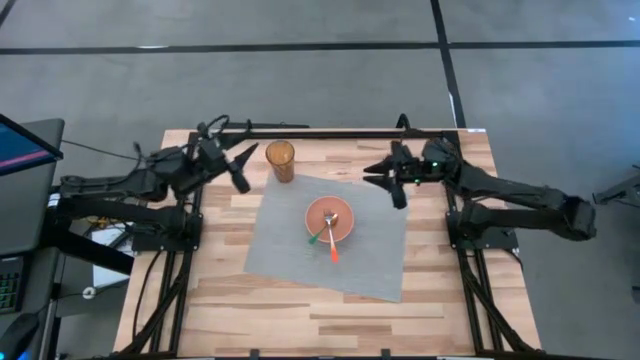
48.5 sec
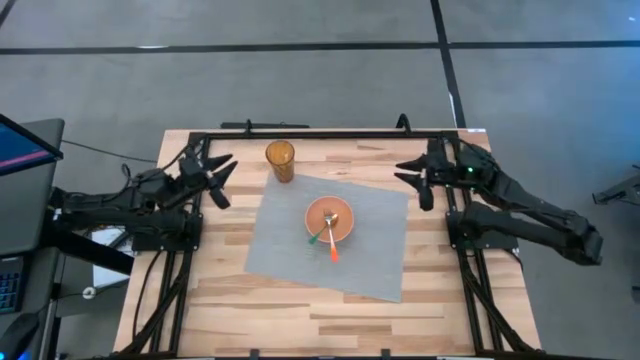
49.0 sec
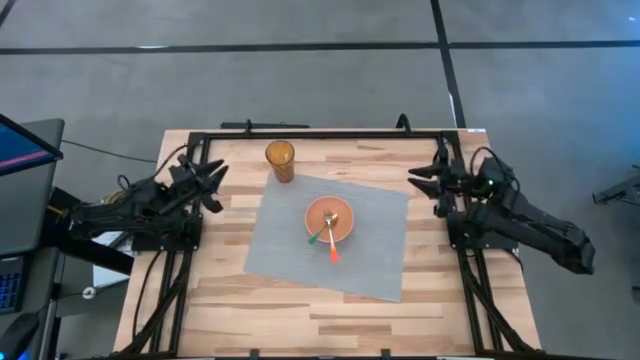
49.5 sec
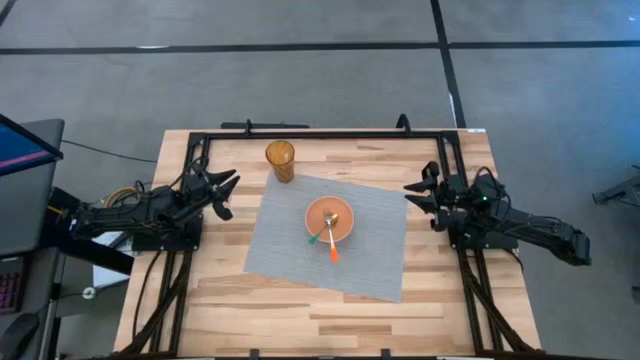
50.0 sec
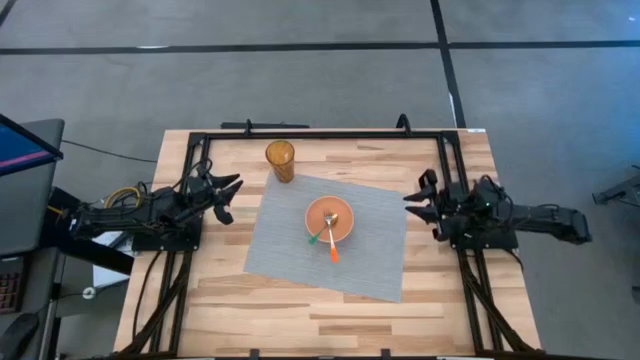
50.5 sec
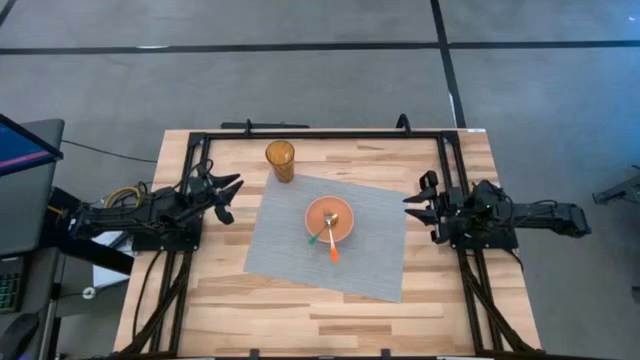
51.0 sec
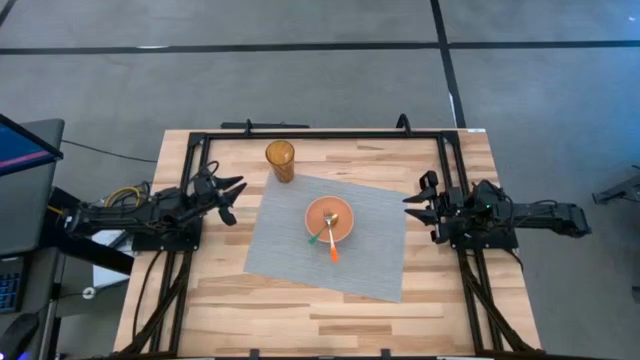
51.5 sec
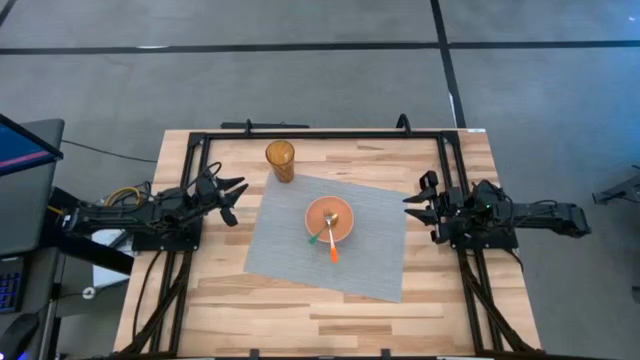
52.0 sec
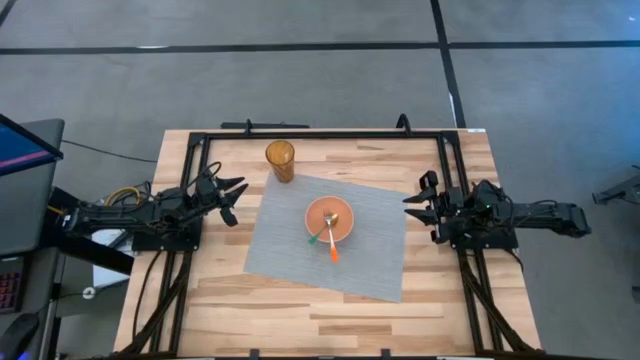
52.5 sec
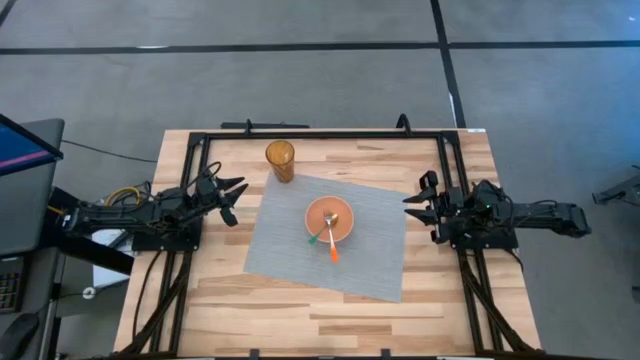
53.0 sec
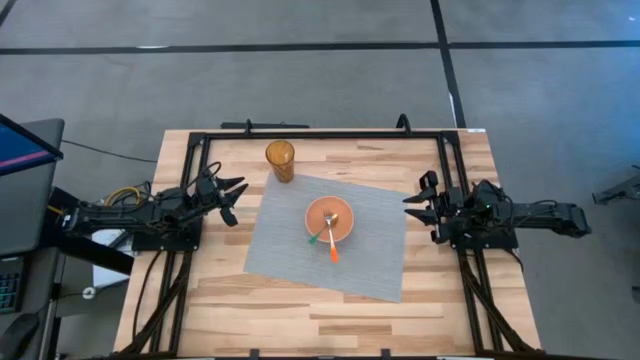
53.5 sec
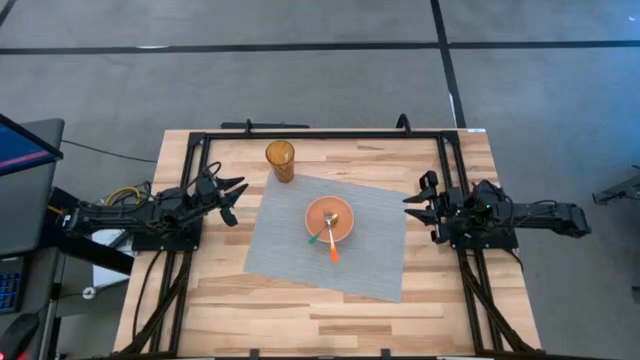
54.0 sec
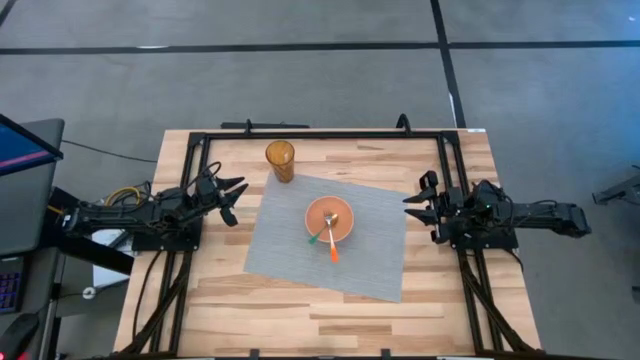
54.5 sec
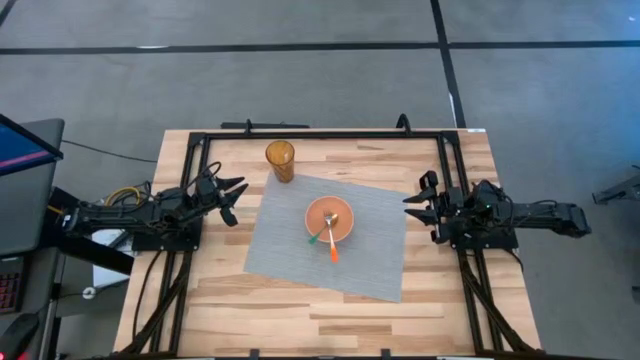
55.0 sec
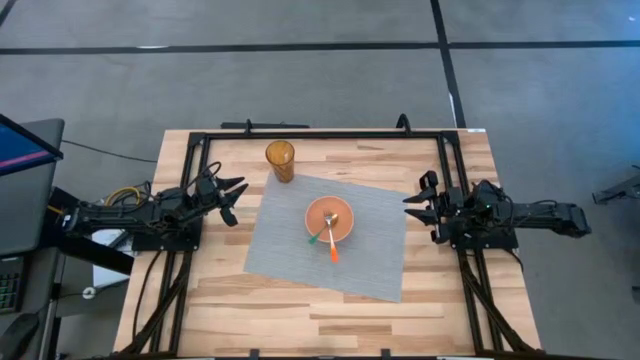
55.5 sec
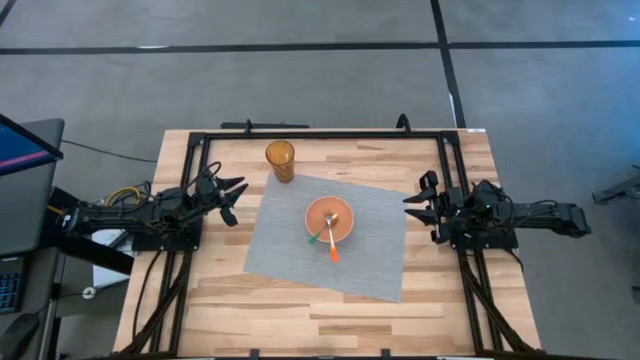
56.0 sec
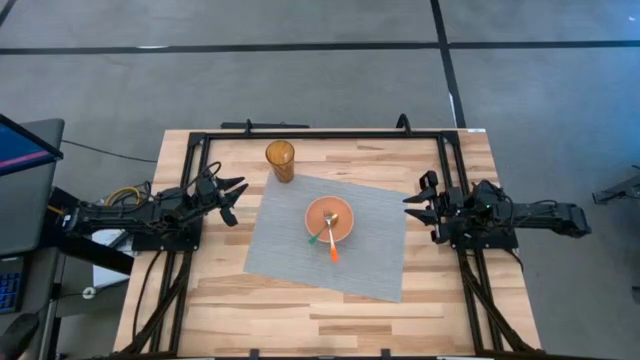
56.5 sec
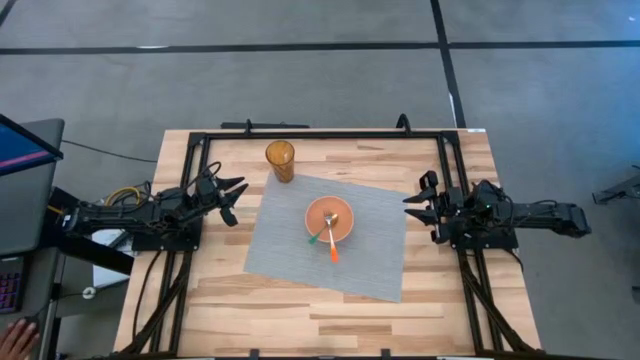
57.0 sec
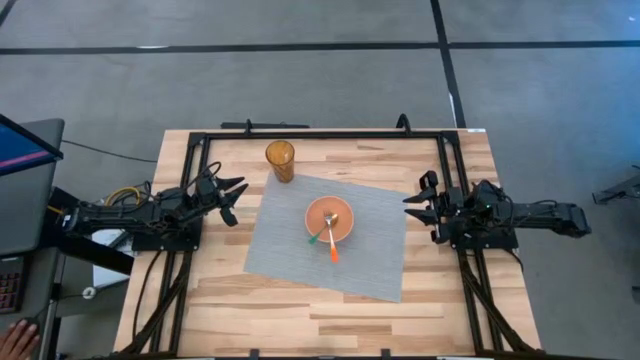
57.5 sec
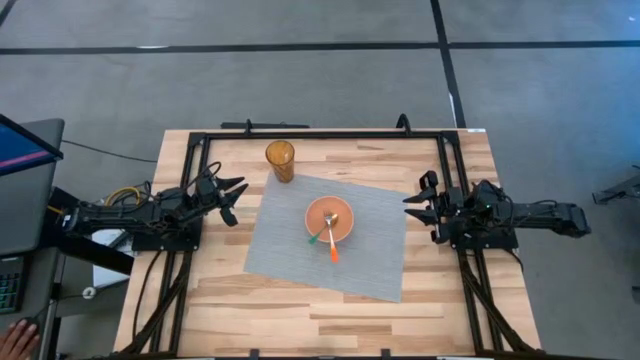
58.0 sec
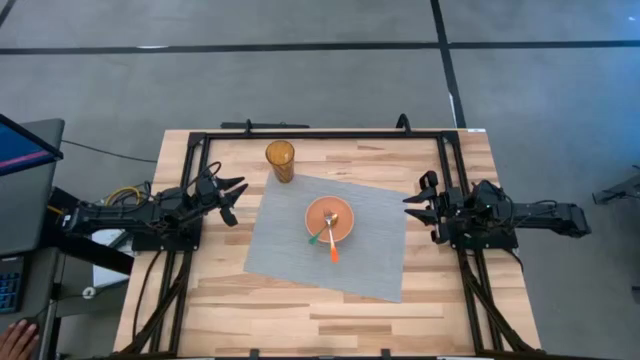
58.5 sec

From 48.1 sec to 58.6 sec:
Task: Pick & Place Utensil
Return to Home Position

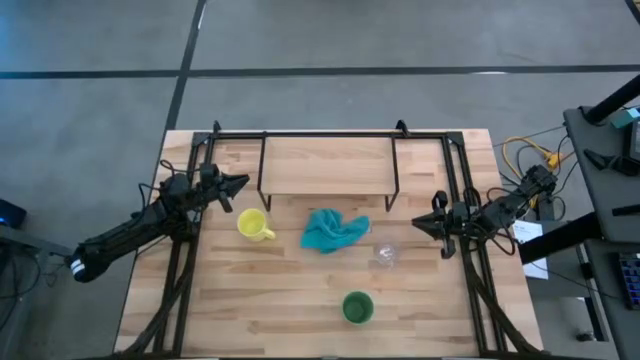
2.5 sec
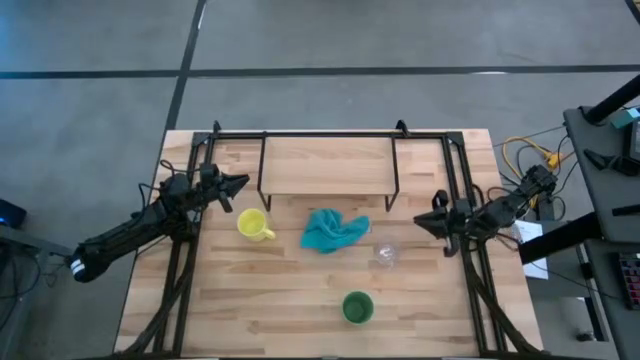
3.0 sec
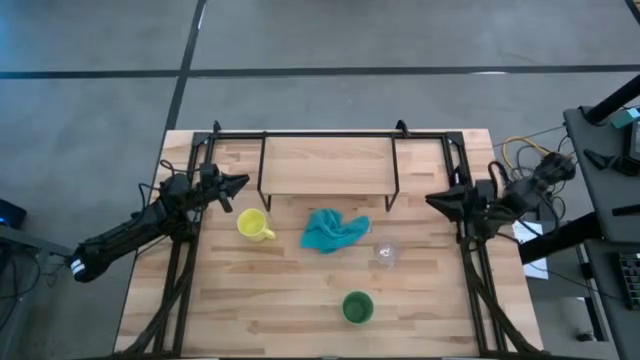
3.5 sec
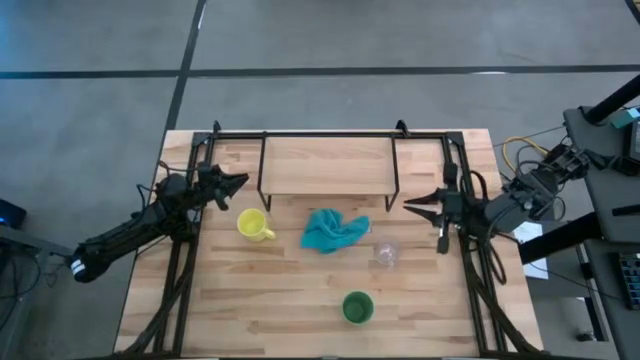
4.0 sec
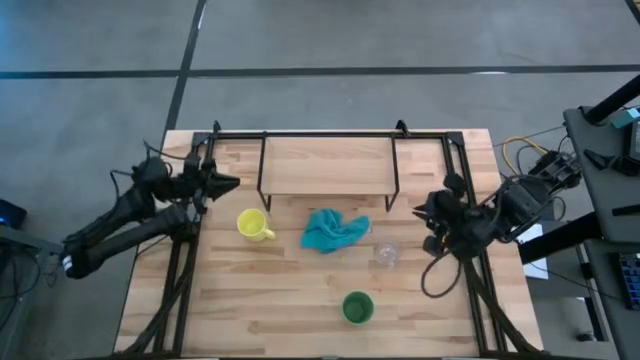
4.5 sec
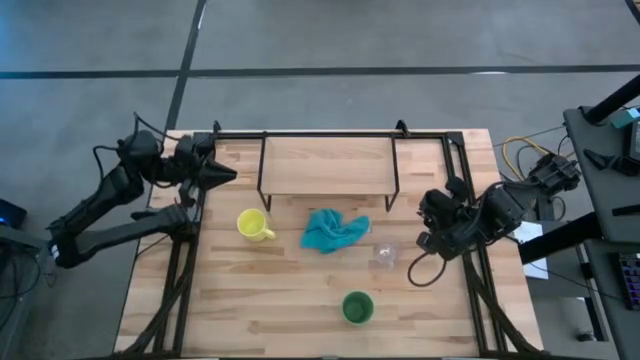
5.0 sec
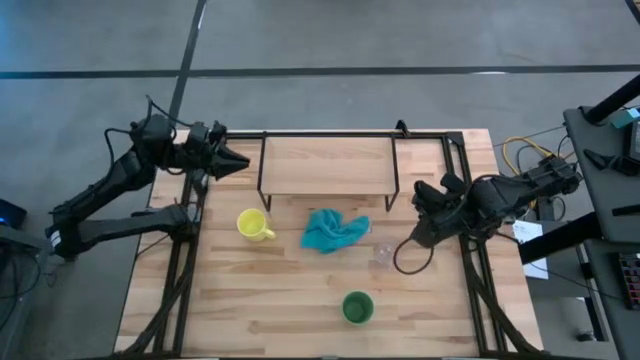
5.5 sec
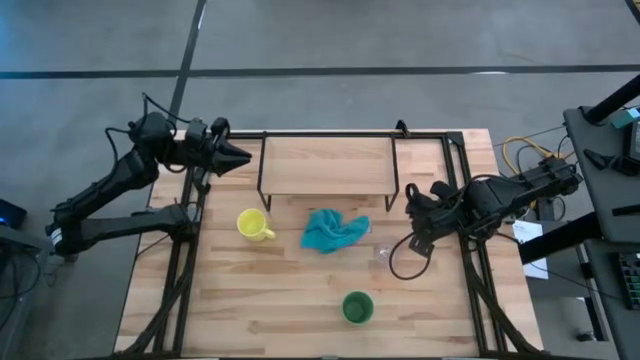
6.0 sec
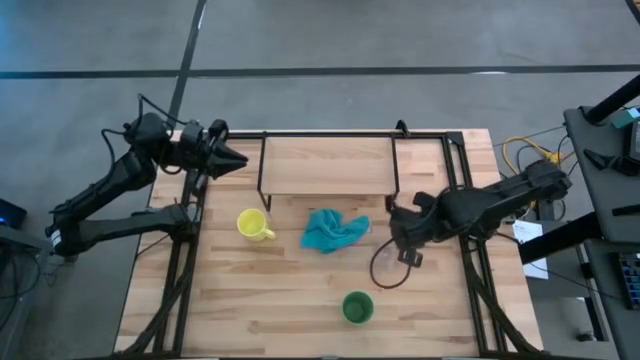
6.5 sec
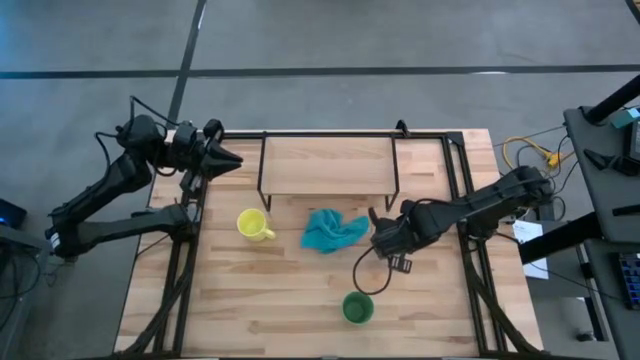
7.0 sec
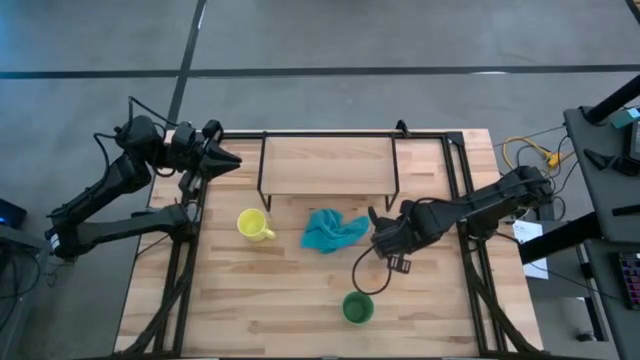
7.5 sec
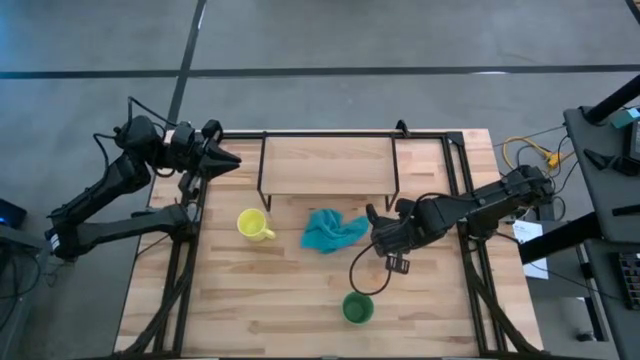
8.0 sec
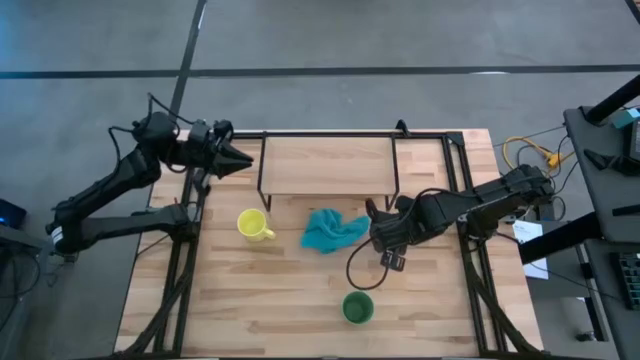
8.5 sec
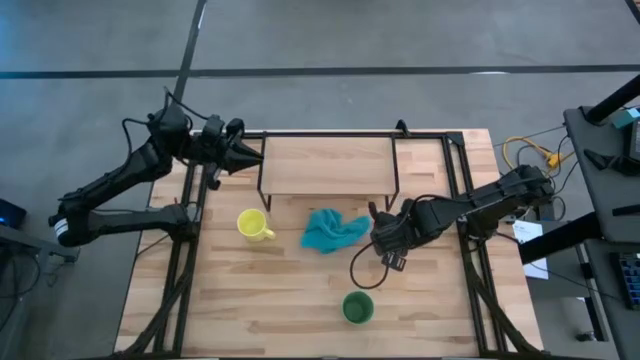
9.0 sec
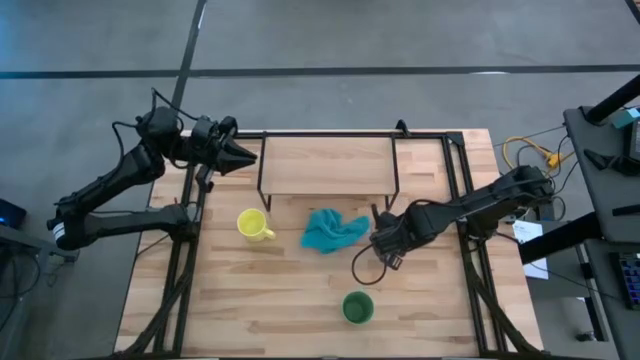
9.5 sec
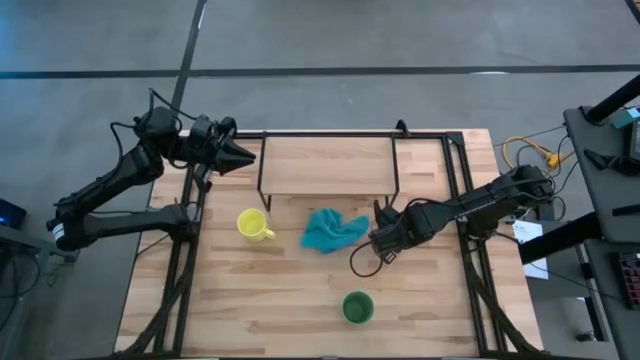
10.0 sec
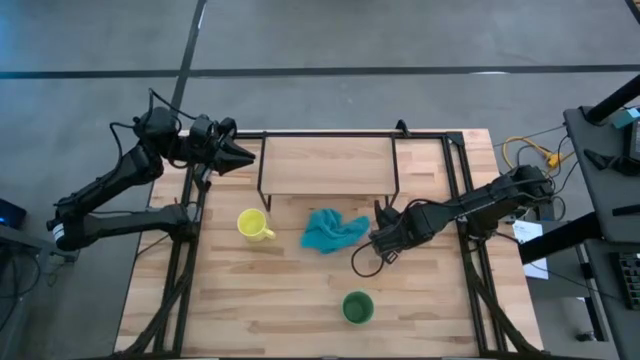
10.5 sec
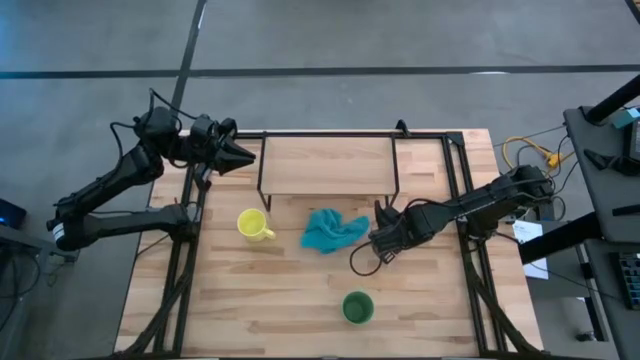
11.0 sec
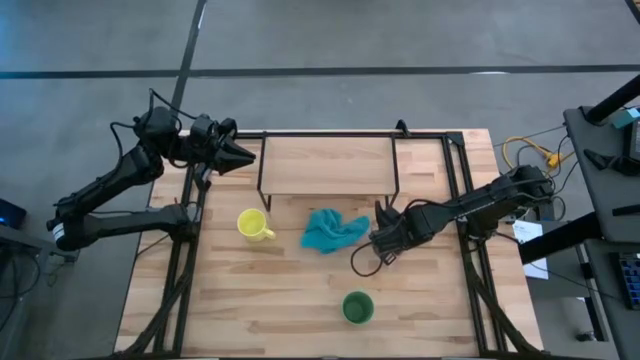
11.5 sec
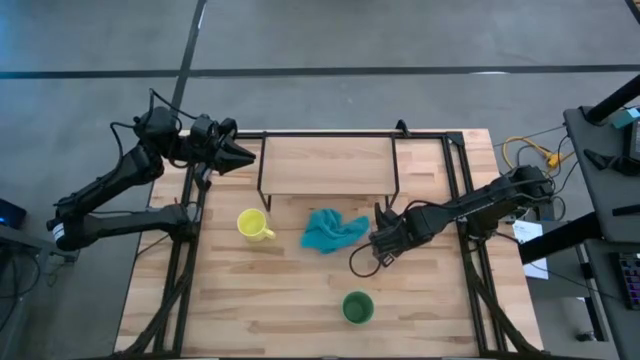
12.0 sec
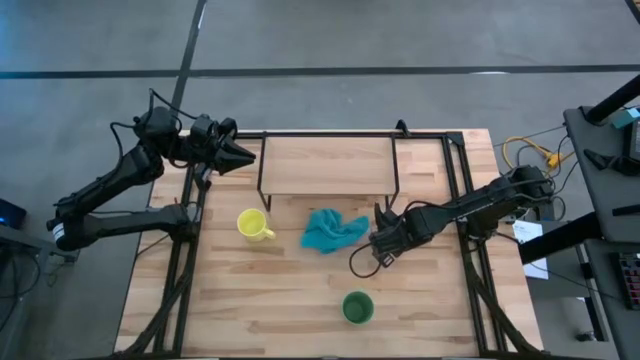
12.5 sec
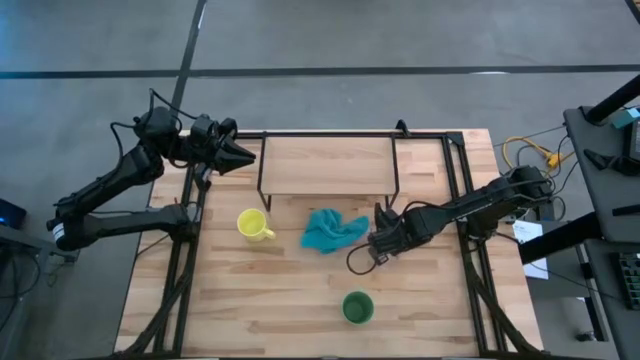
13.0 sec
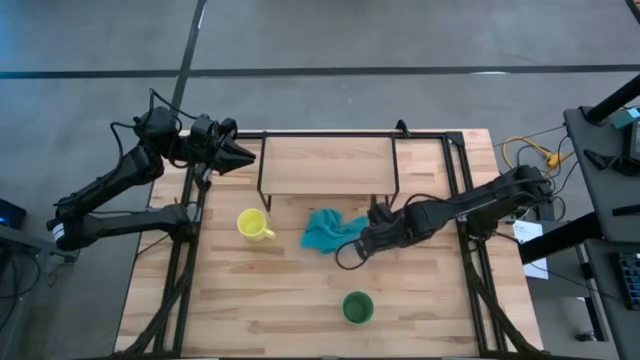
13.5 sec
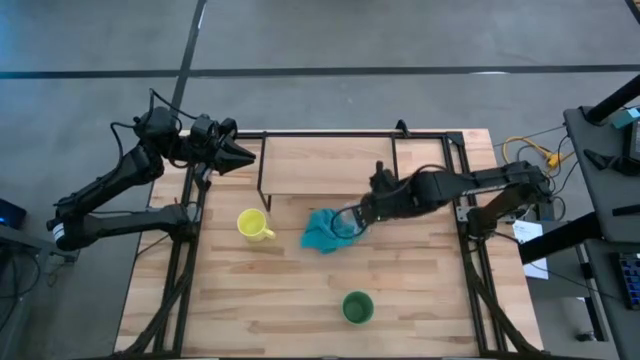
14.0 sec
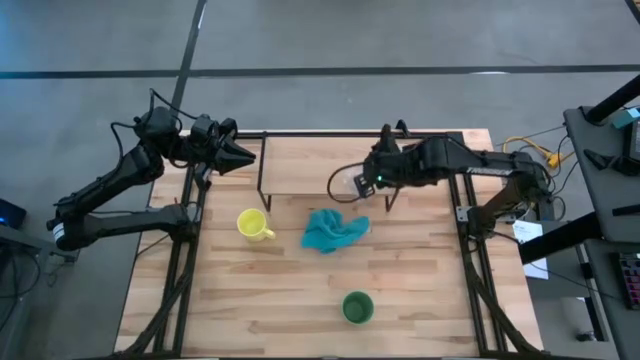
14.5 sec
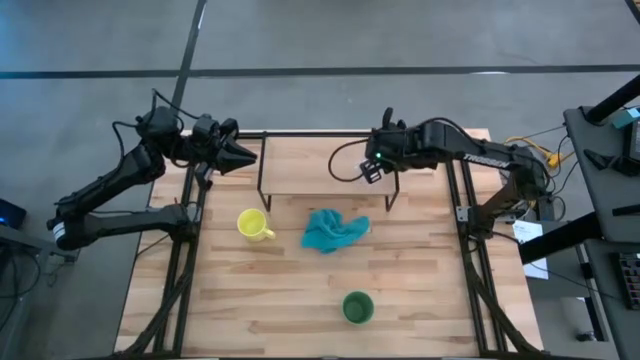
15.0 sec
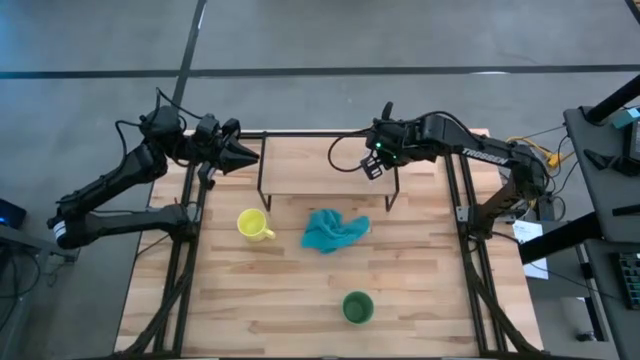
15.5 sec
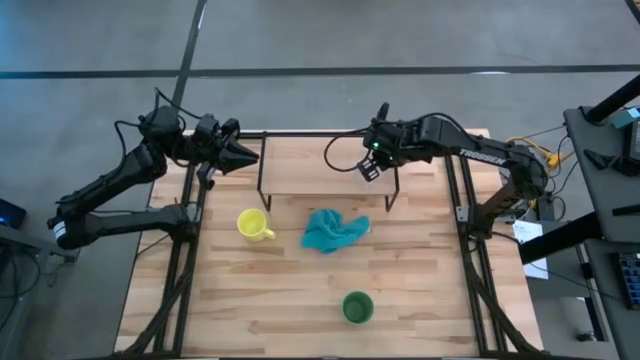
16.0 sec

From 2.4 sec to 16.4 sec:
Task: Stack small to large cups/mugs on shelf
Put the transparent cup on the shelf
